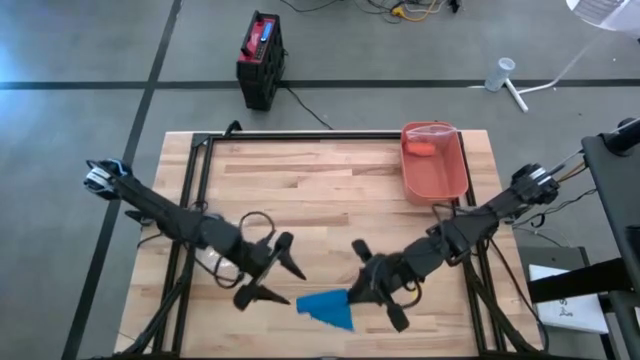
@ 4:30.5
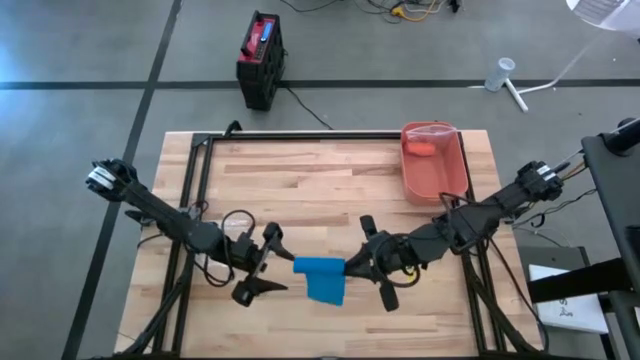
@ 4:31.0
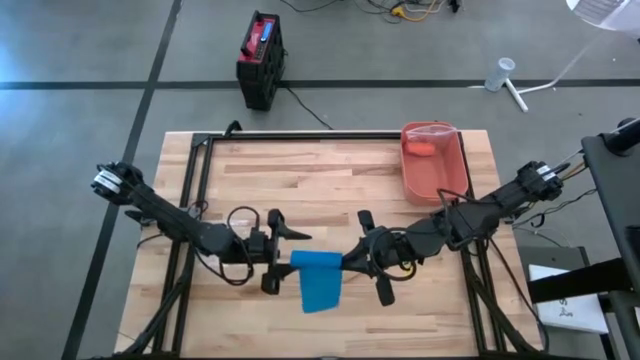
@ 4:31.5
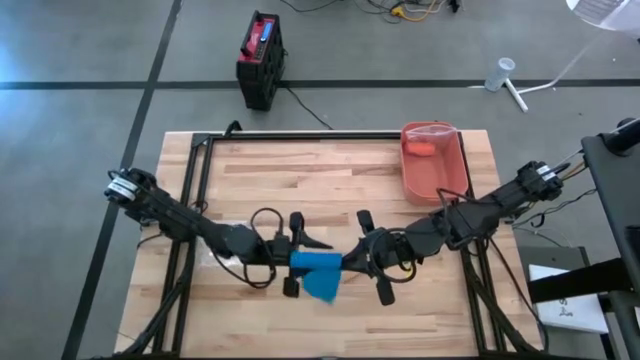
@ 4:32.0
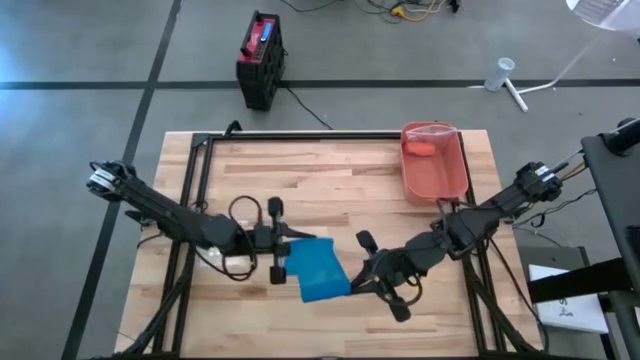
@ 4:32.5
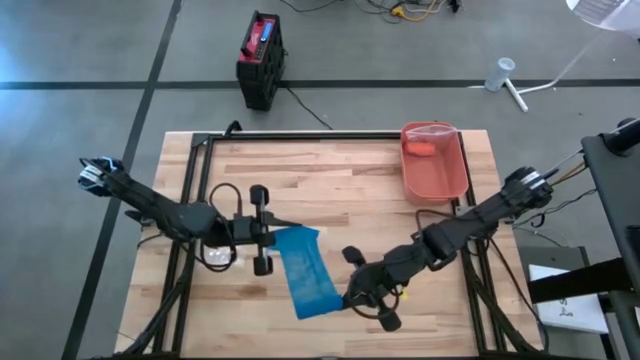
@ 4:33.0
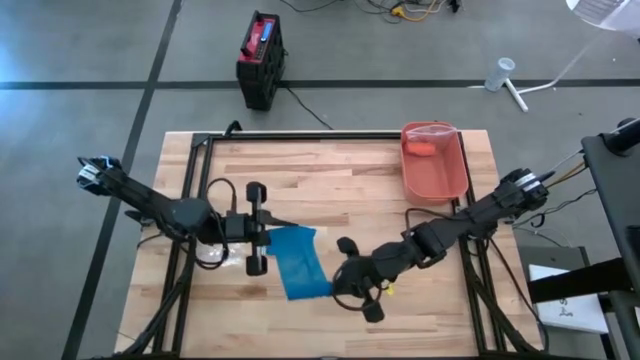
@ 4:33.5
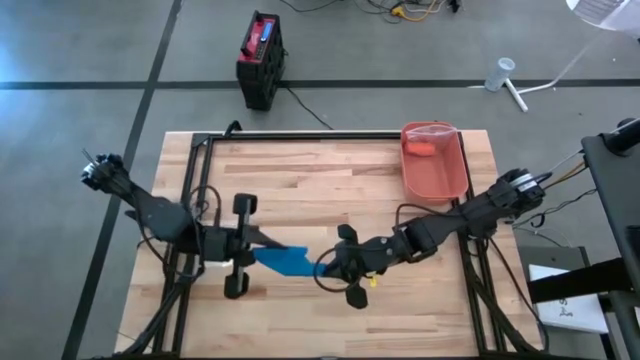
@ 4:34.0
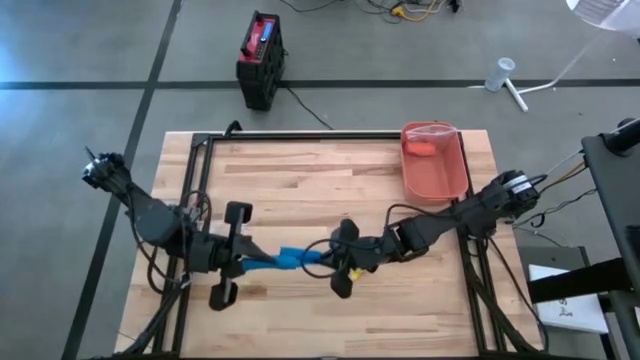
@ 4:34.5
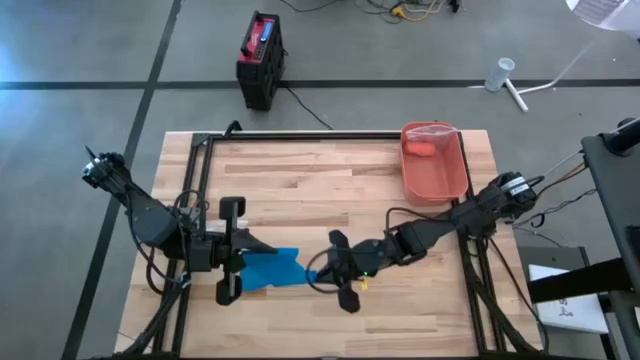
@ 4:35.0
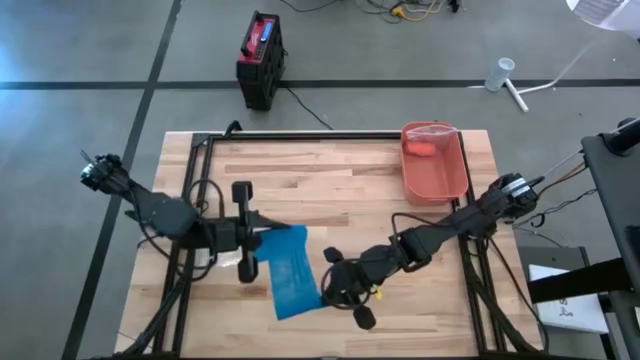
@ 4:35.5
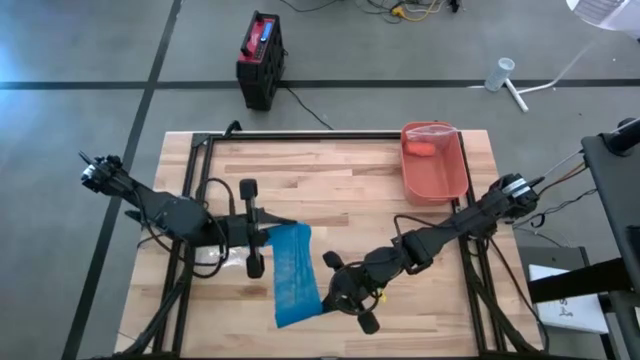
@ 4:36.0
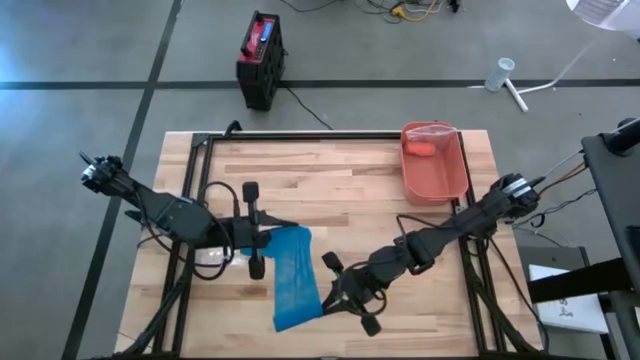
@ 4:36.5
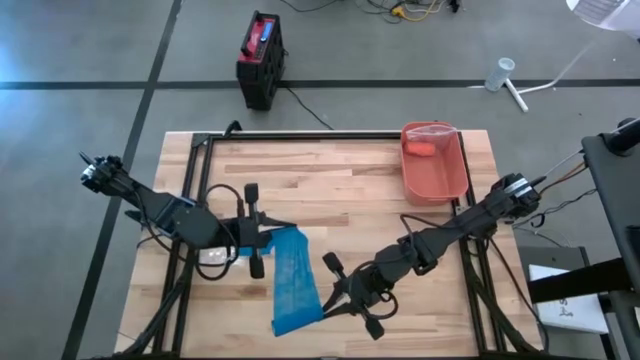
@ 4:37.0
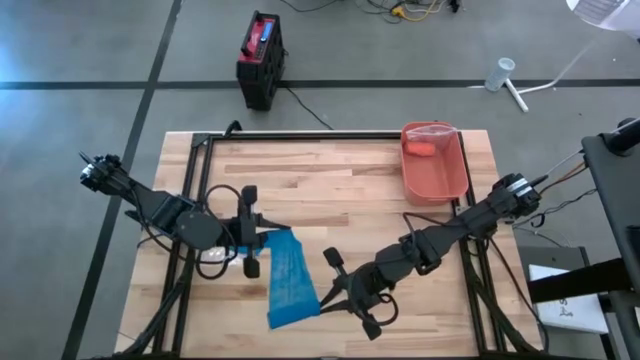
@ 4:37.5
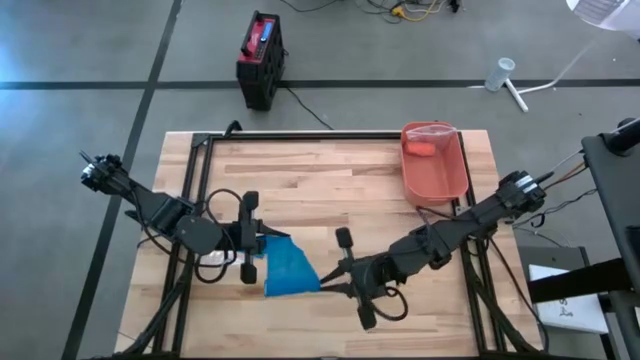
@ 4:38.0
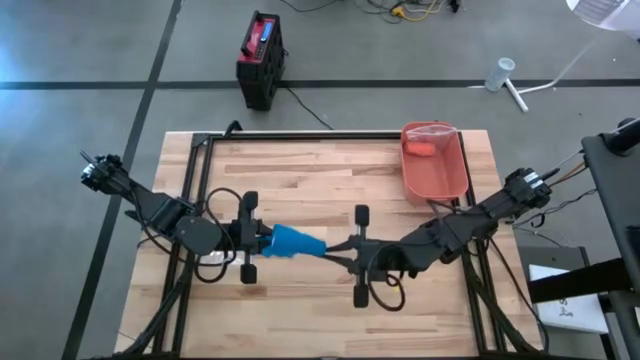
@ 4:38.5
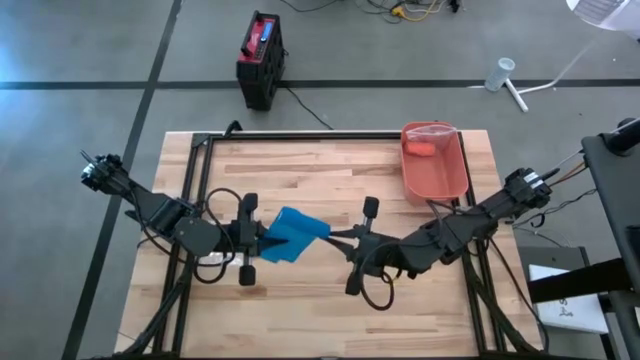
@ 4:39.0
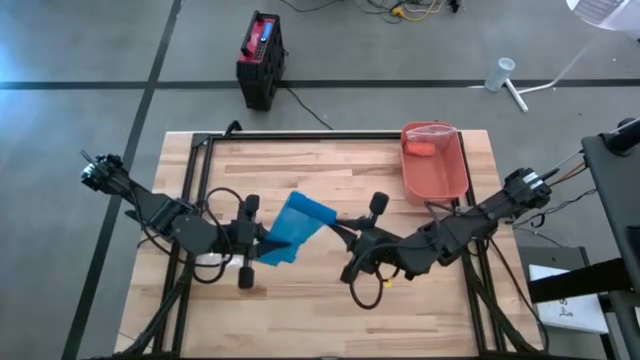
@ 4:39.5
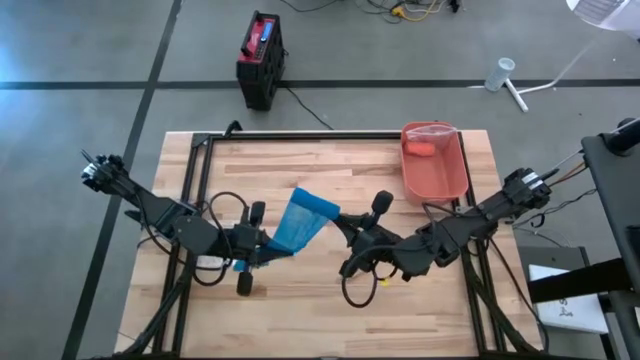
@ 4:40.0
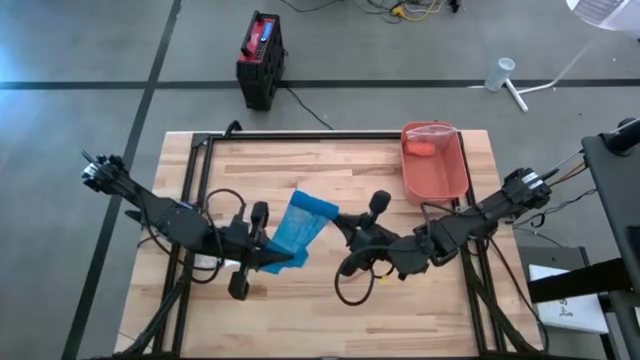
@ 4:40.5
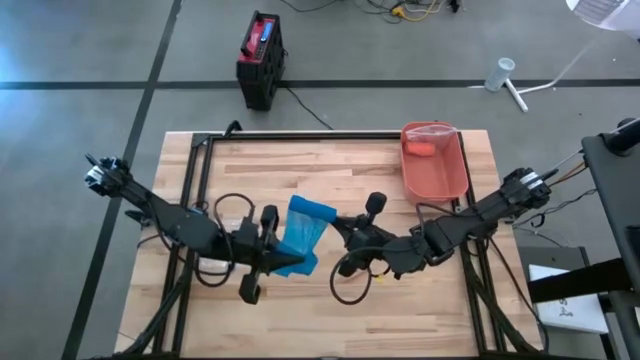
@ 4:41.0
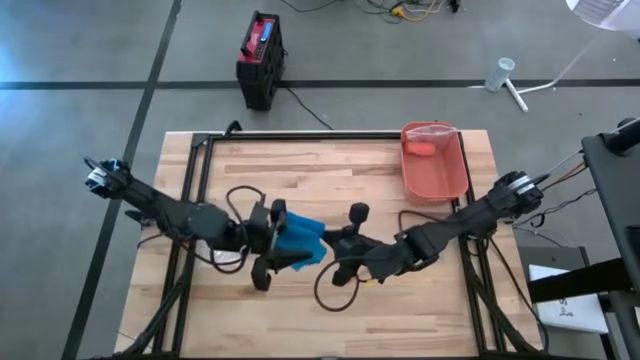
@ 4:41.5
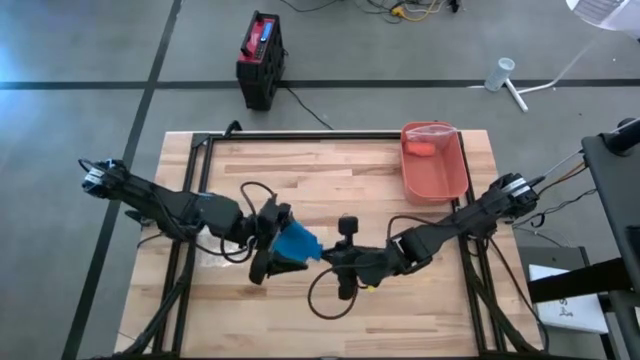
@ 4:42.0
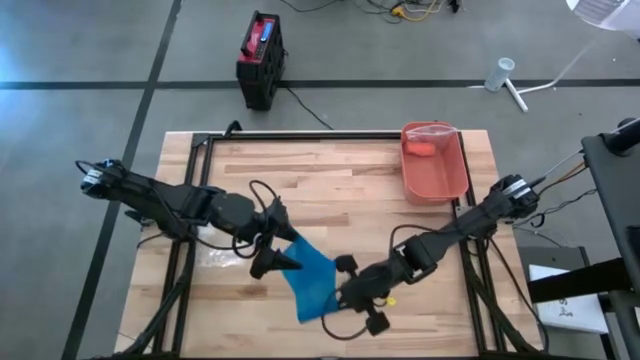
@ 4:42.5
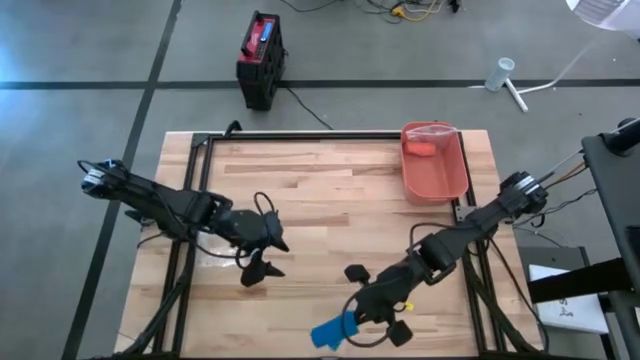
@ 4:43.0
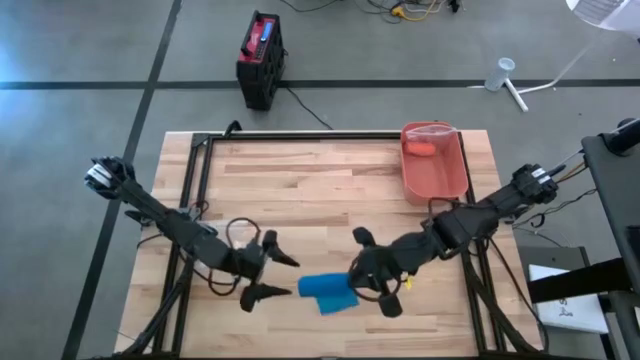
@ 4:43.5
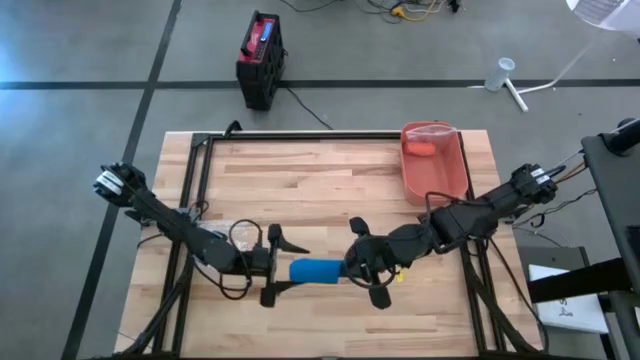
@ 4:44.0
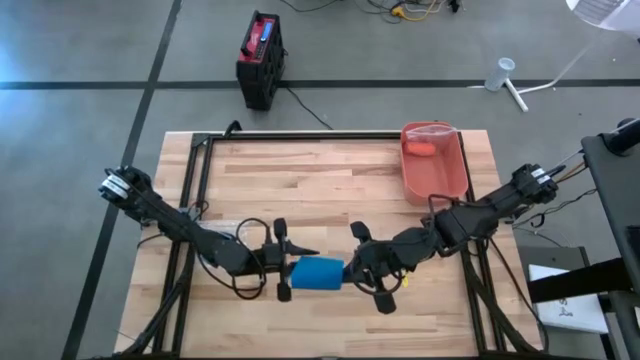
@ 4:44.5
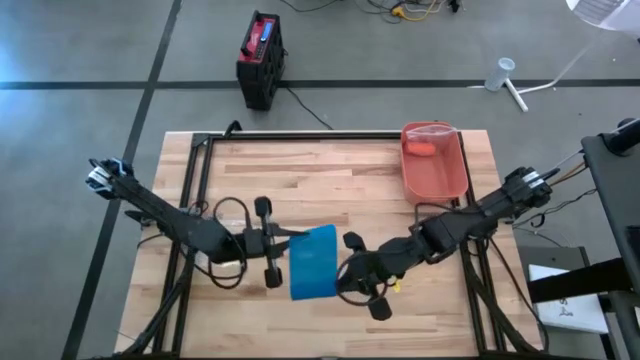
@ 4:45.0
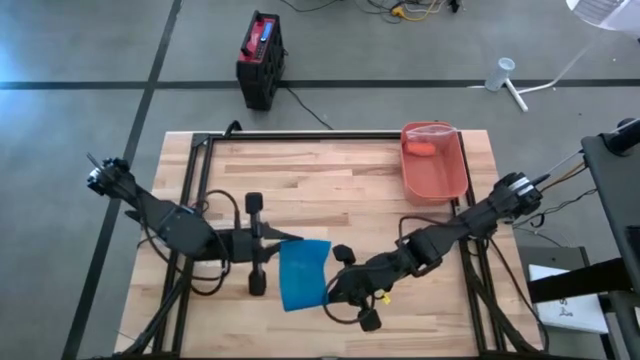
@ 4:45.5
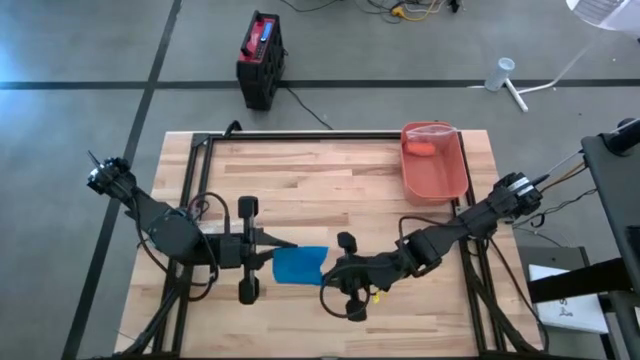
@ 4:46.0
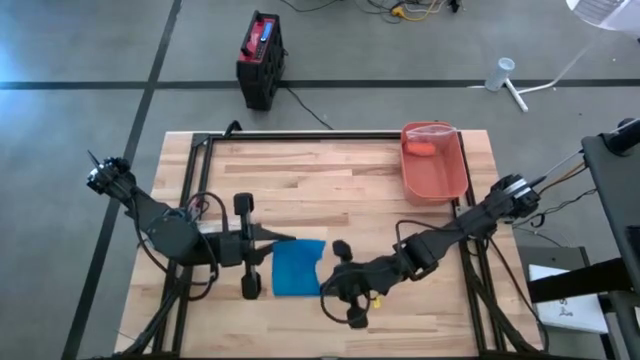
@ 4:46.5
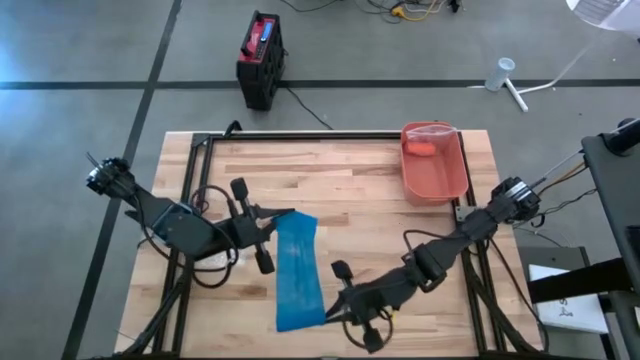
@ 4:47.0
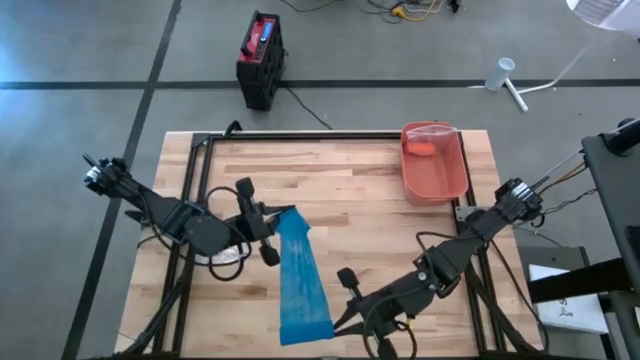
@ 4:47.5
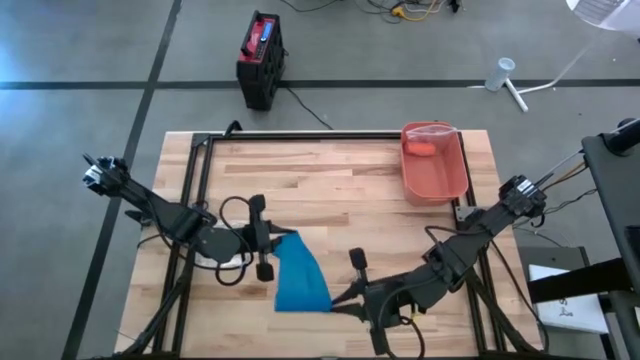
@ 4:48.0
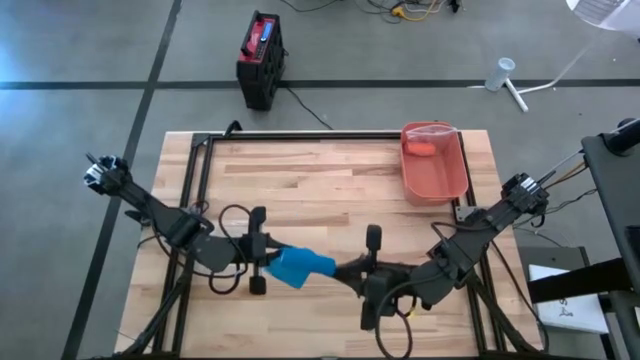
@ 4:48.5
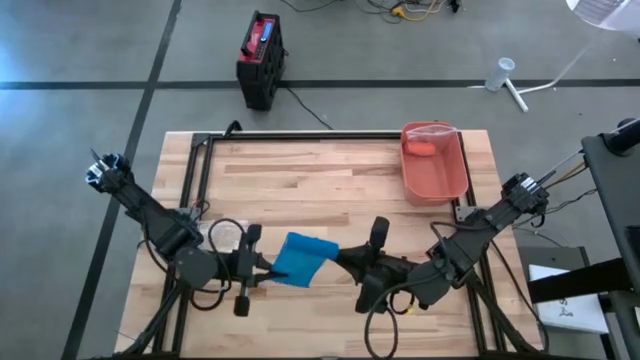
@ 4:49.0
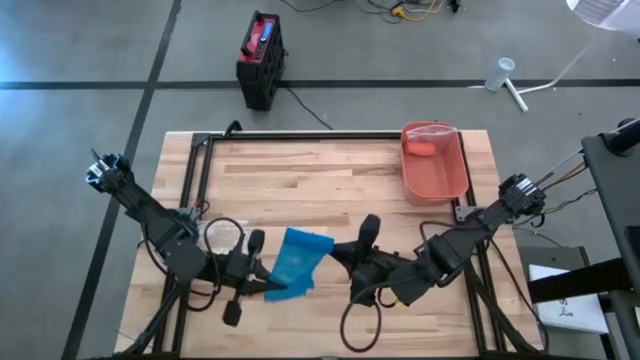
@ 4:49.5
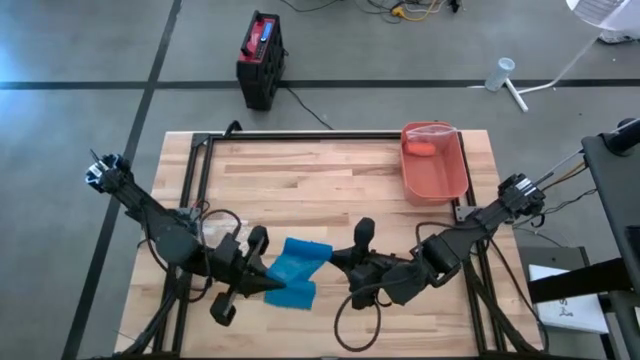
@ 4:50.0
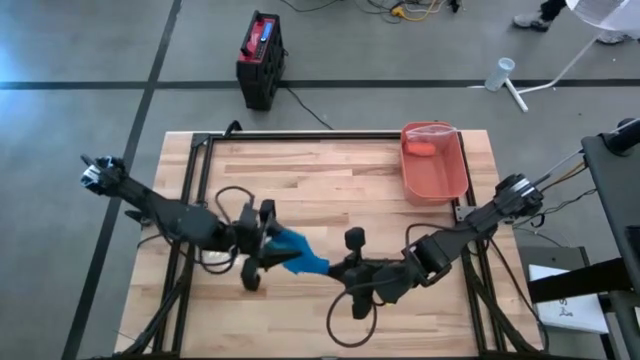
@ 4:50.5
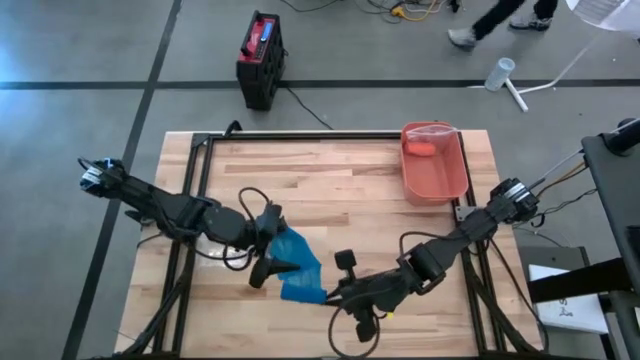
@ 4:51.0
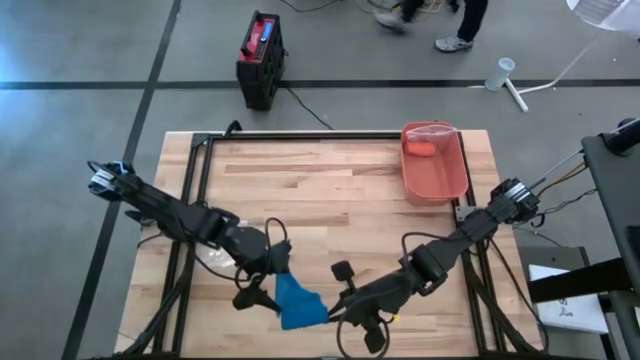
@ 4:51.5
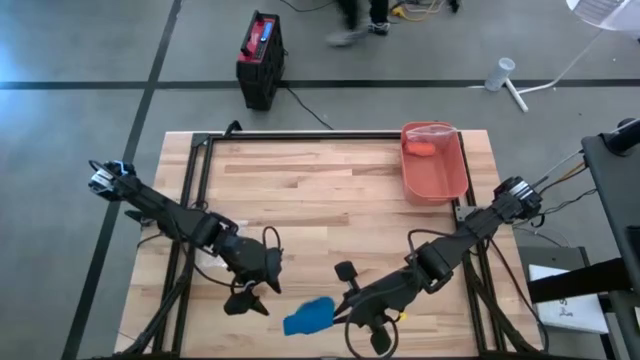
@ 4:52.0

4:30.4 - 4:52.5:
Task: Roll bandage
Roll the blue bandage
